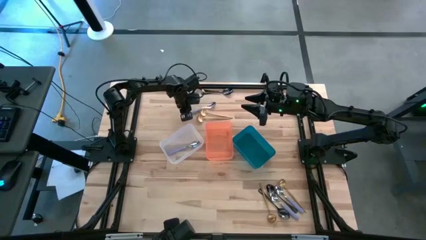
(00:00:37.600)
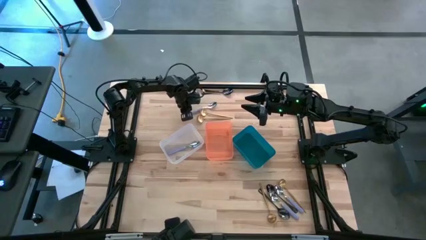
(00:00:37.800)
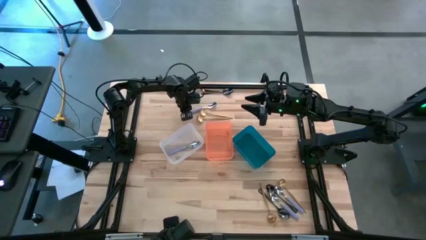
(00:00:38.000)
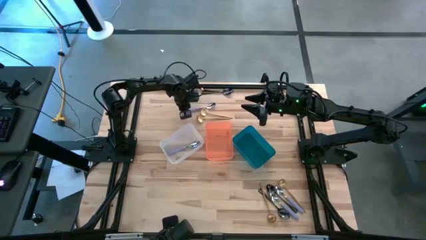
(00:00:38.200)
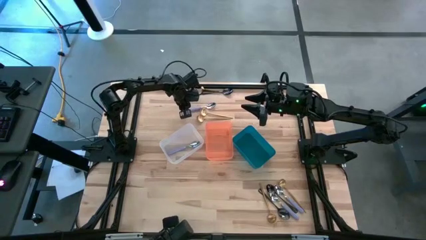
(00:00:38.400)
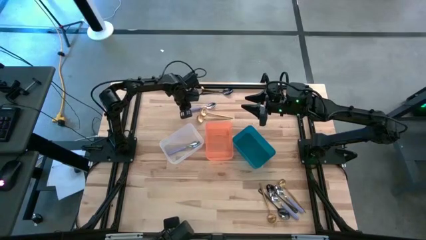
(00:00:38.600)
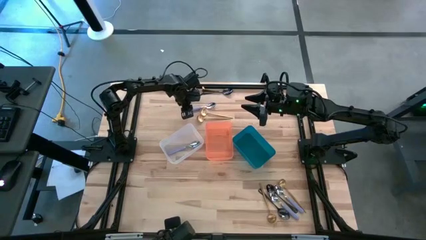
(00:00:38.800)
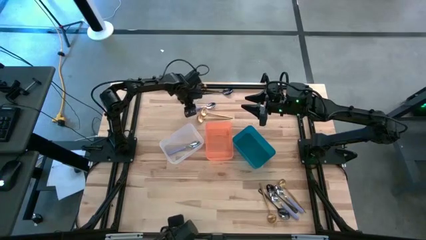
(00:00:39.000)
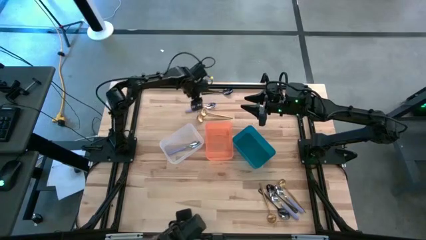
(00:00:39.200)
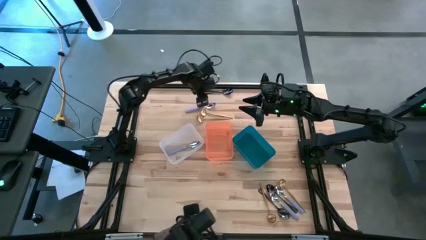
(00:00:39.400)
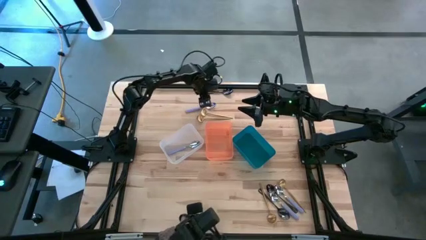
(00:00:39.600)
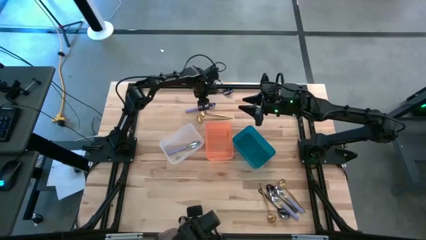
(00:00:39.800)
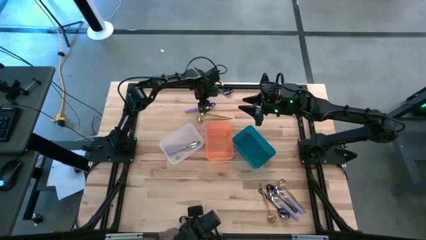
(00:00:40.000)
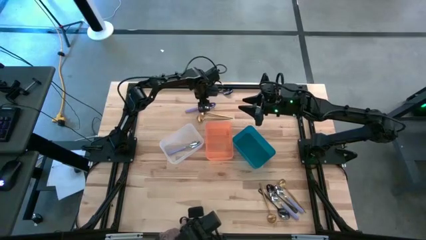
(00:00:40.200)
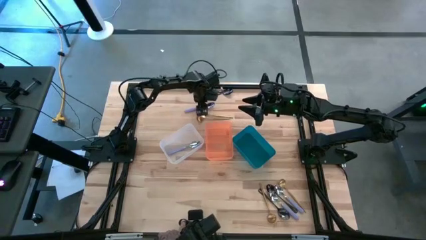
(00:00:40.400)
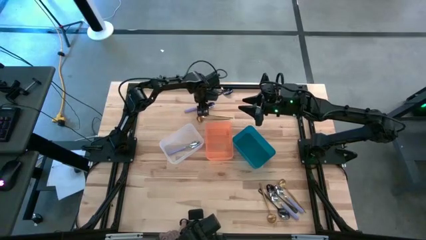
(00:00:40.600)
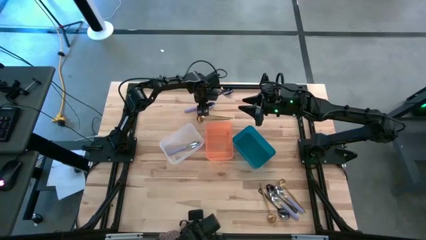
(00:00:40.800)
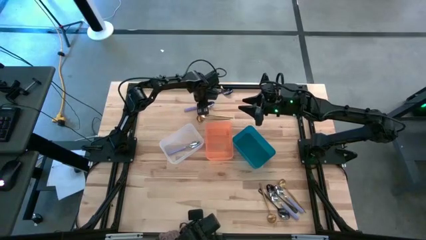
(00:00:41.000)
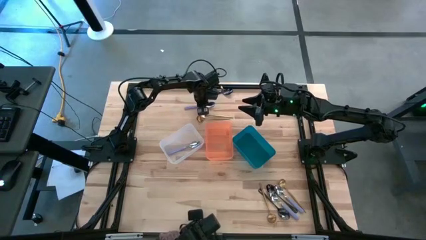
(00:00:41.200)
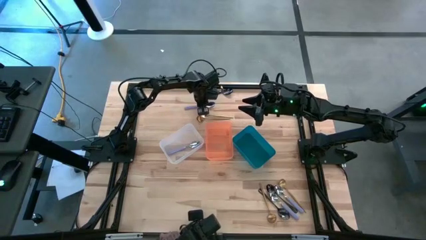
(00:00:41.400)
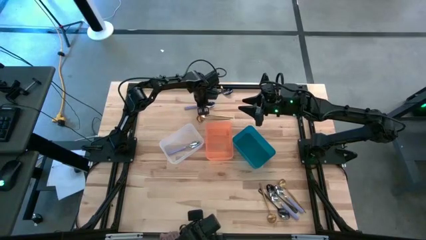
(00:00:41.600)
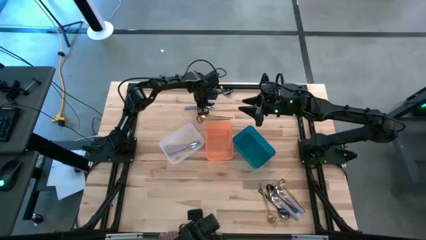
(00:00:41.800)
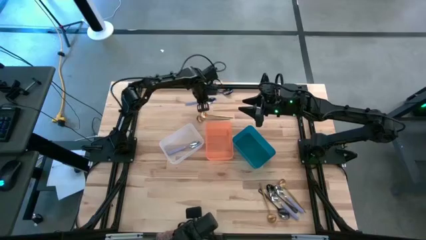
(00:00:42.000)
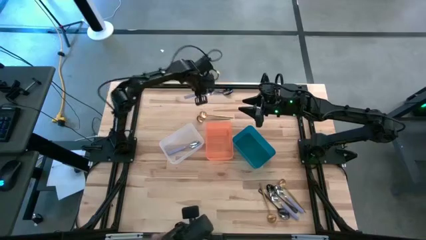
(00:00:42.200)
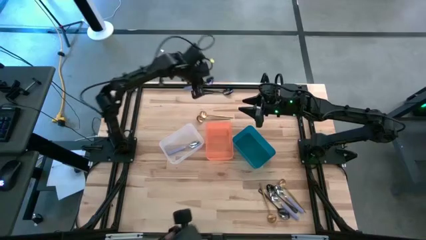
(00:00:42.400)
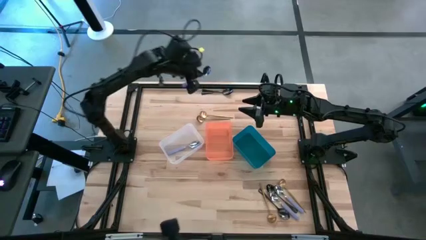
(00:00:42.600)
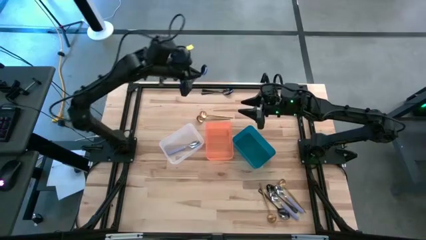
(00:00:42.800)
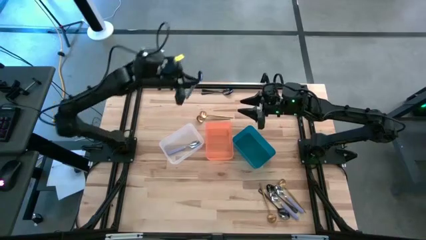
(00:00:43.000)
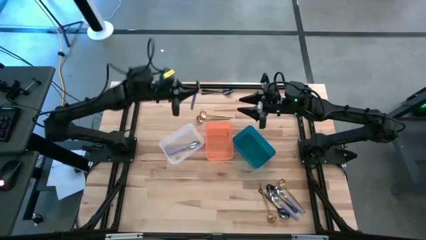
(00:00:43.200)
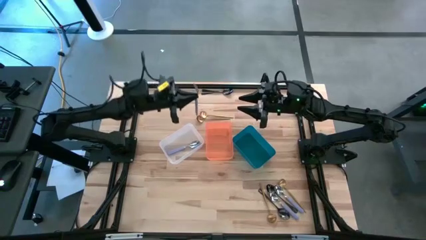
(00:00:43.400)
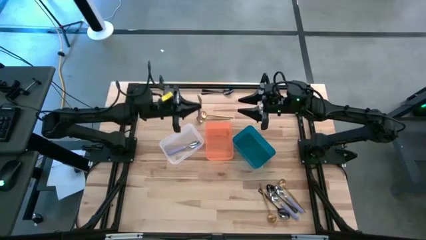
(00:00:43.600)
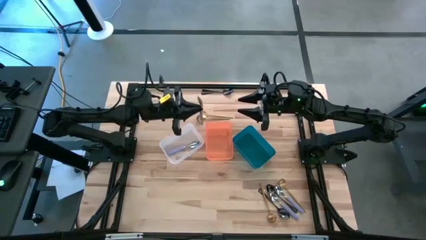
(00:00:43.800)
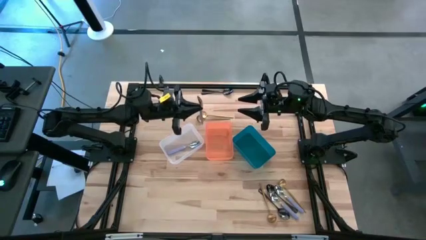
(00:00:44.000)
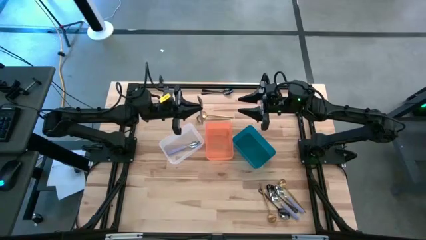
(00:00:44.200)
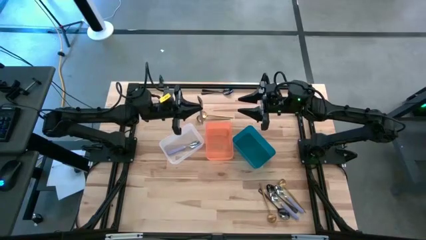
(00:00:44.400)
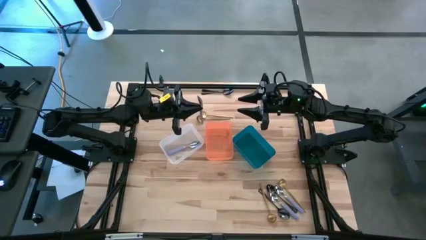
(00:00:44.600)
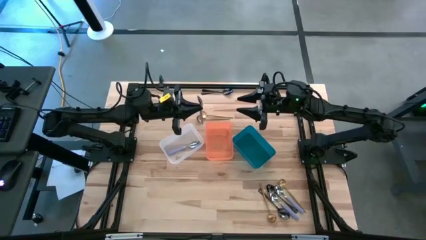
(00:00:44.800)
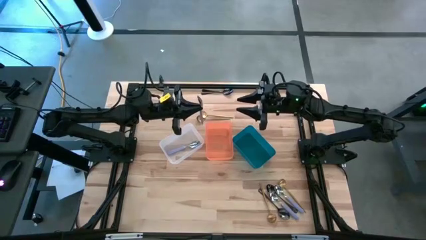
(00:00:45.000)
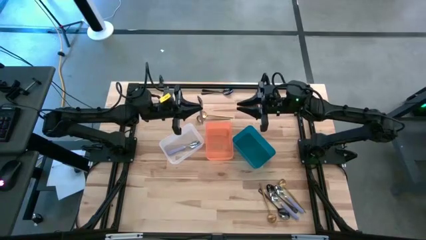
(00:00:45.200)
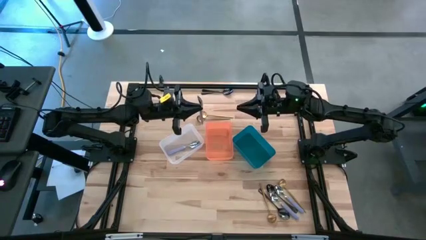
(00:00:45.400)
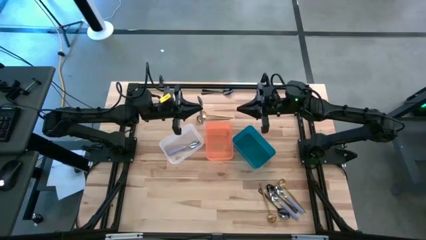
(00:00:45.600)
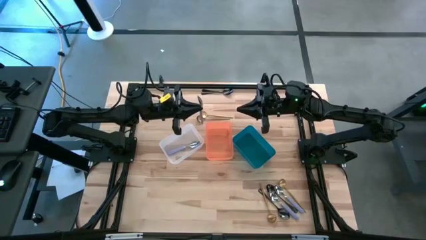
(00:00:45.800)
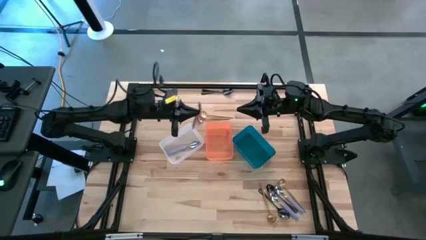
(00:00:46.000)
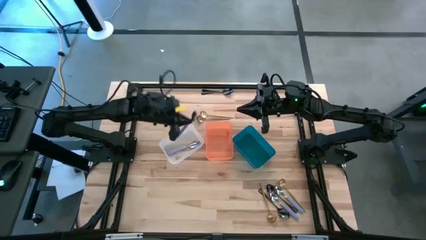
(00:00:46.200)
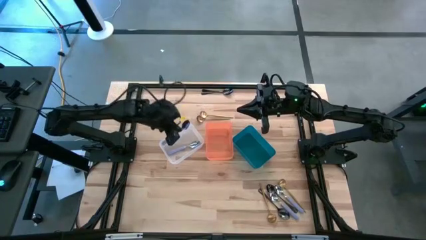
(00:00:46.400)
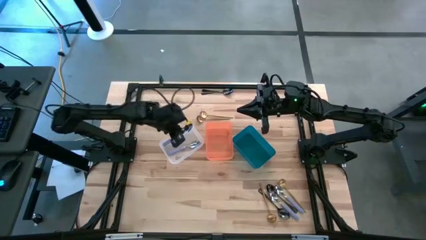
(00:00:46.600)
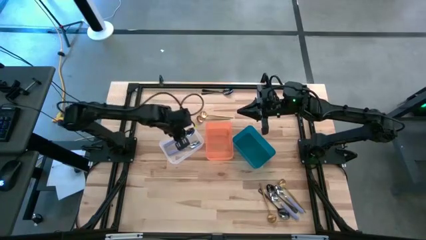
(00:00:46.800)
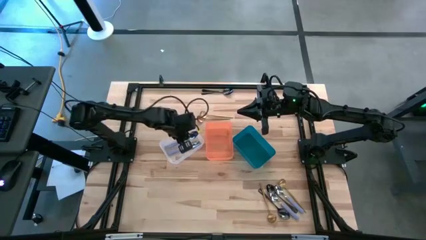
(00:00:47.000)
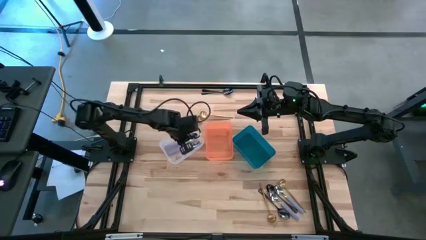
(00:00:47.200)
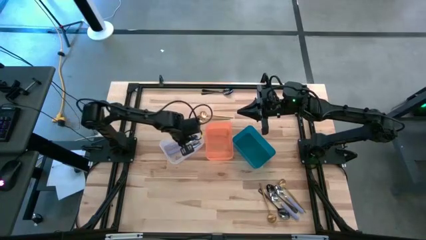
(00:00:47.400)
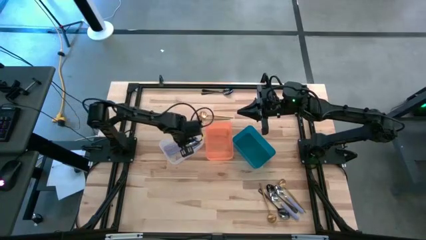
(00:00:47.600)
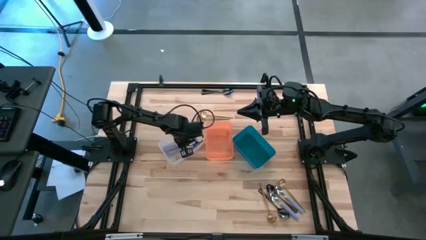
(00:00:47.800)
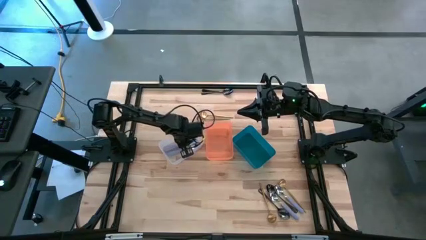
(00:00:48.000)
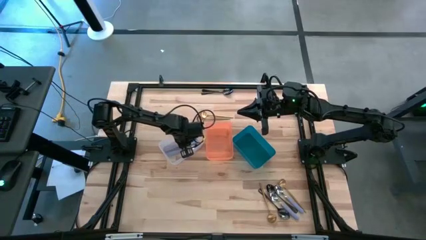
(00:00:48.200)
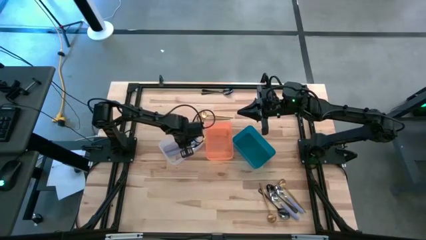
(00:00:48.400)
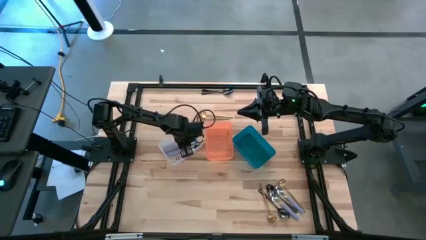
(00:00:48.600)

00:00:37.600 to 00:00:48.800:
Task: Sort silverware by color (type)
Put the purple spoon into the white bin

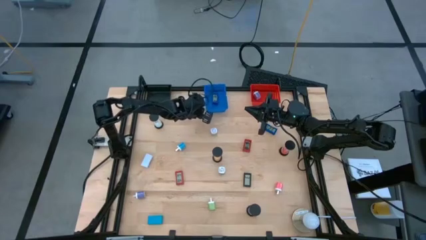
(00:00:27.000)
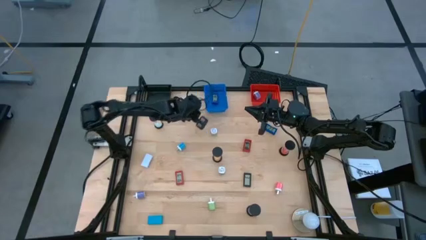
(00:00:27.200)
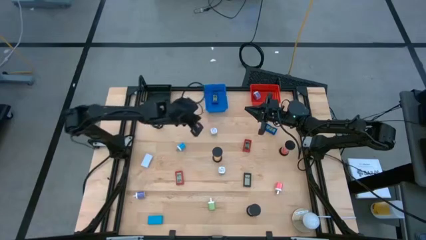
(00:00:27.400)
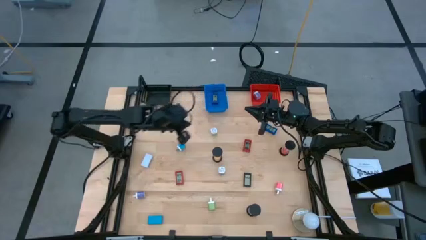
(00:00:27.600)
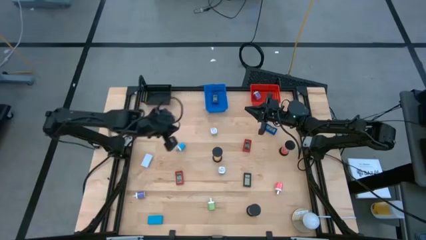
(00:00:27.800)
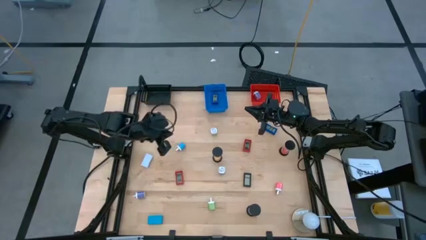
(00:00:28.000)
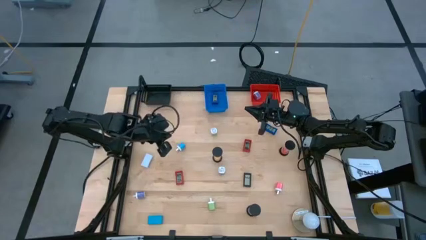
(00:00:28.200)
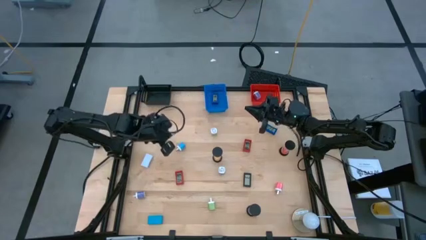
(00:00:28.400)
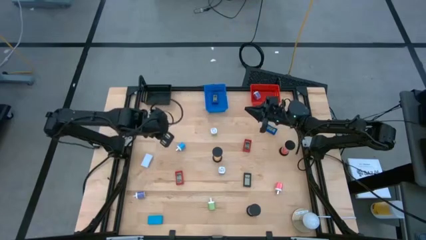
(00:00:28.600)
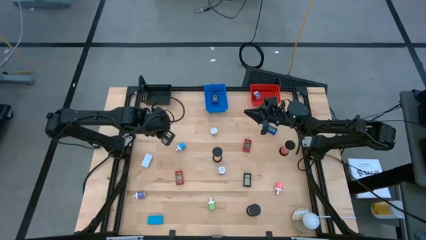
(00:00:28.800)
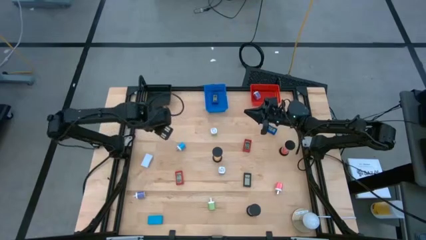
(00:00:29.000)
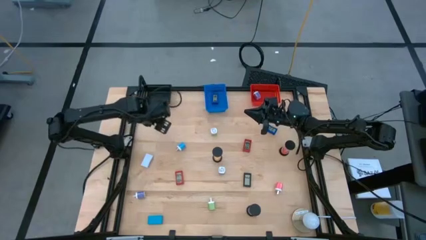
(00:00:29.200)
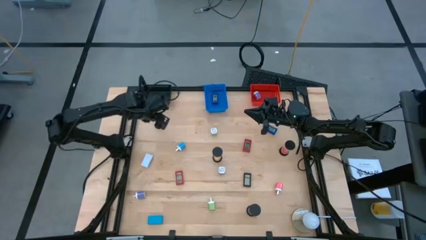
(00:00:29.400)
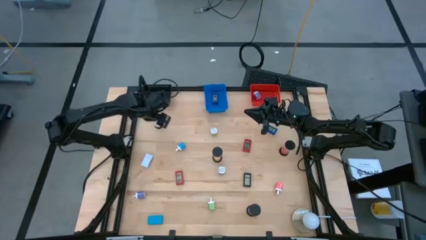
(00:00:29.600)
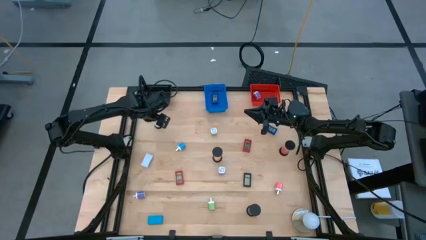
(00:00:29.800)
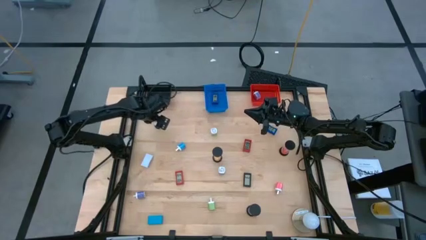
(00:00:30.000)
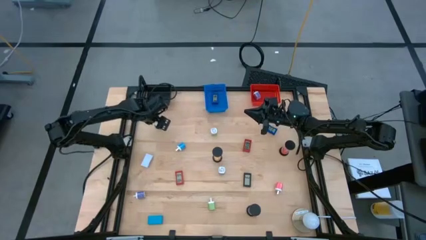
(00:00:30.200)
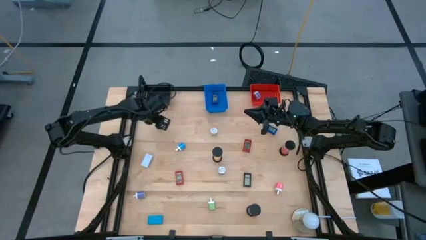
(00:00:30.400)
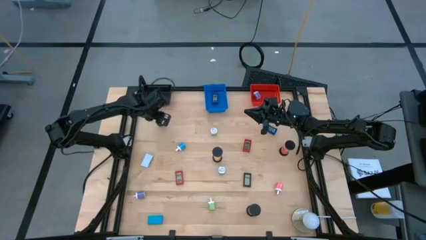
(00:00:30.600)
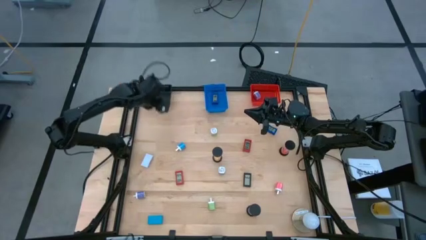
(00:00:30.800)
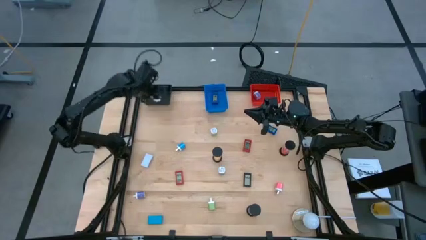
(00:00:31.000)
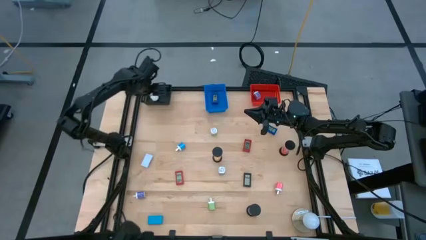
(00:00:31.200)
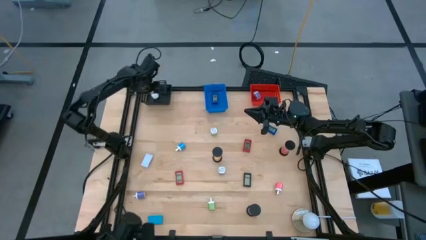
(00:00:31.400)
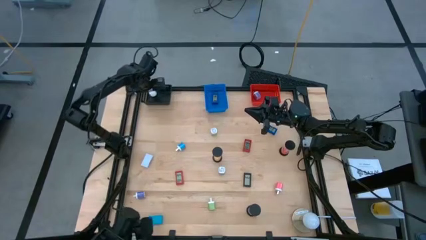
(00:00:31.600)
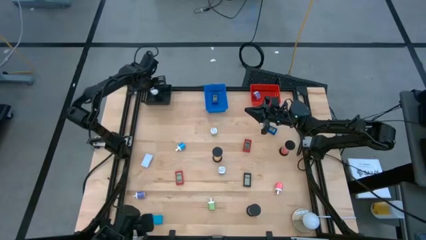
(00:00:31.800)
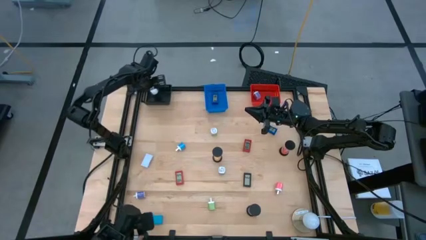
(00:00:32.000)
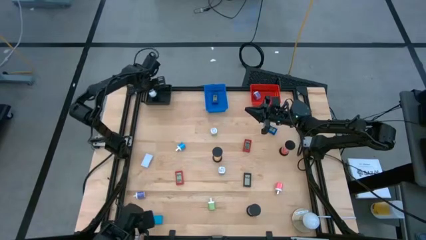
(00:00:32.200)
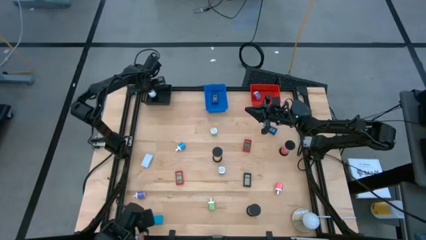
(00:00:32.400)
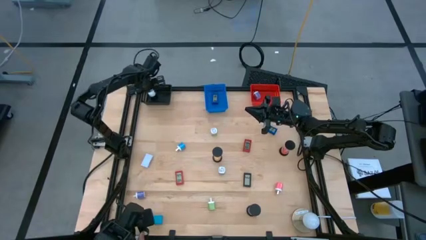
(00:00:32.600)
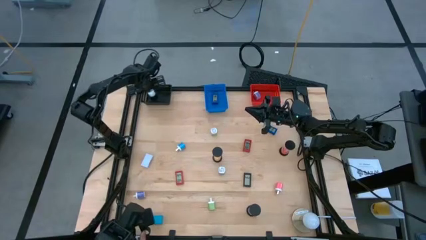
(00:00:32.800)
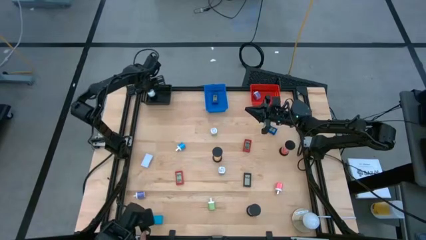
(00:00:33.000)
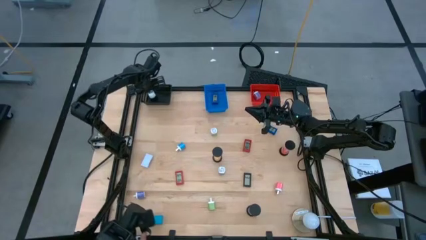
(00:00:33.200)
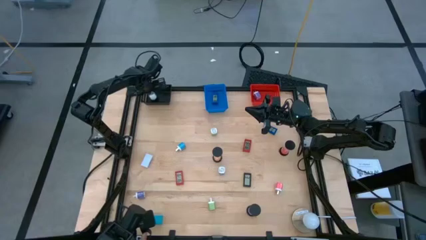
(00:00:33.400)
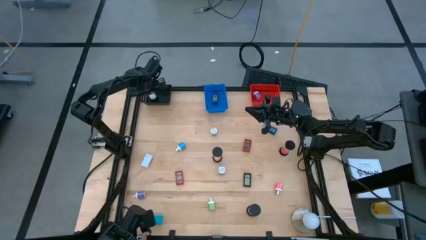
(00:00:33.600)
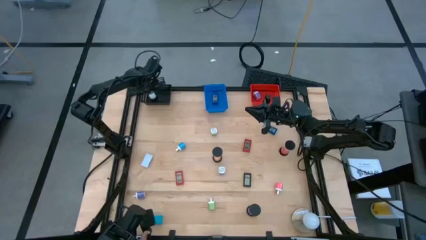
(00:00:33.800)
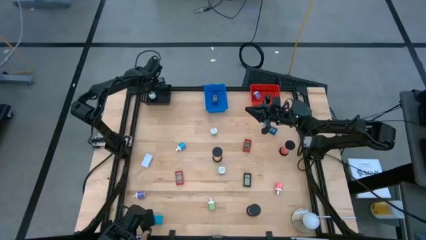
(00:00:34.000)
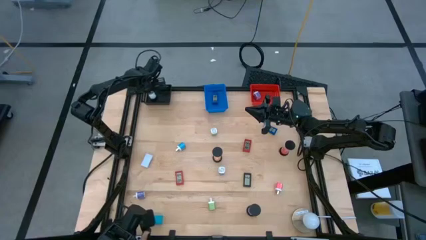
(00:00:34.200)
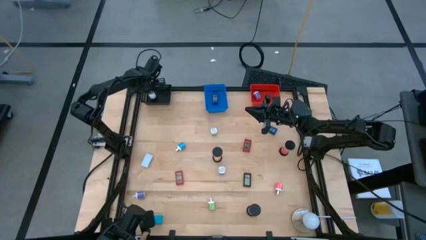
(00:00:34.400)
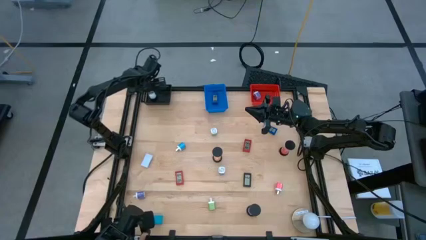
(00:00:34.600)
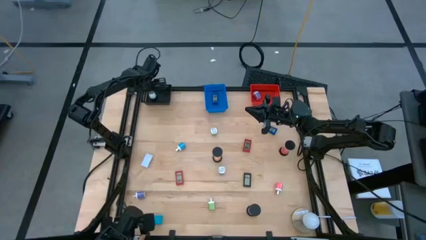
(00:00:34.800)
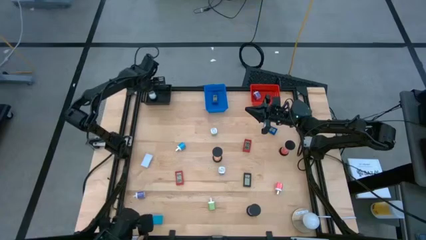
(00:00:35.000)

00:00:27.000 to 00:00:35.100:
Task: Pick & Place Office items
Put the white hourglass into the black basket
